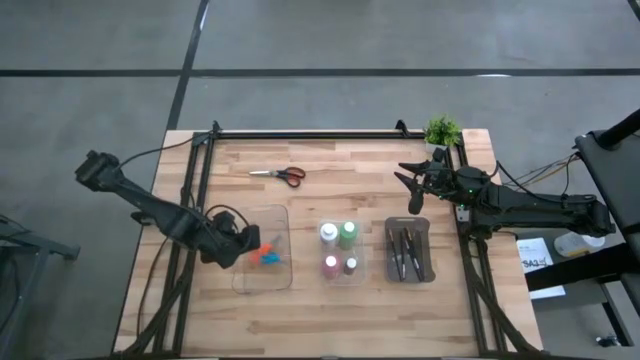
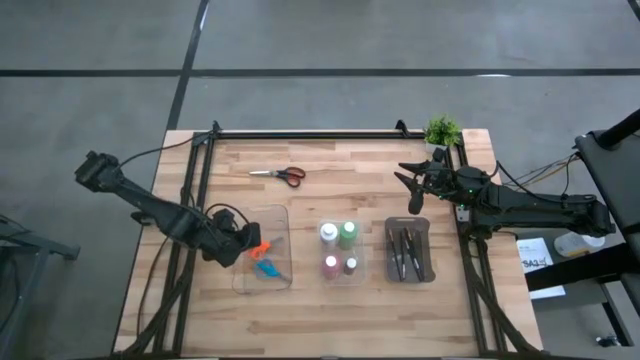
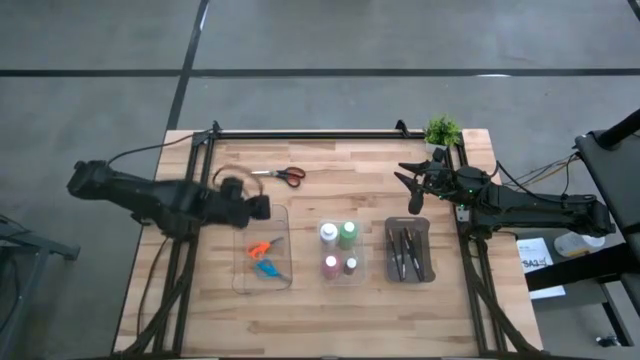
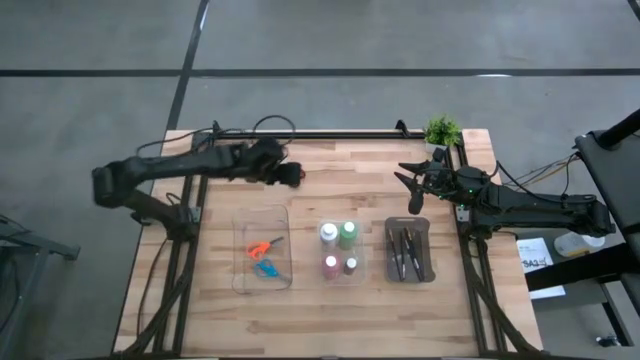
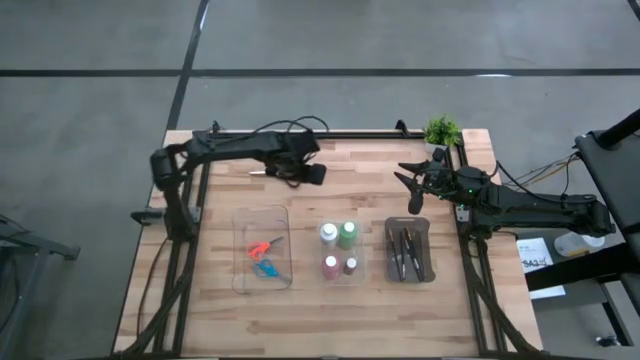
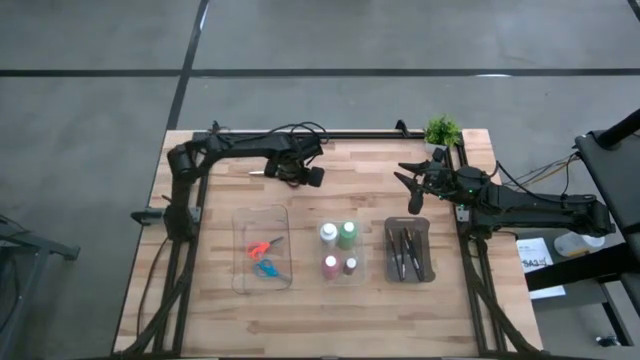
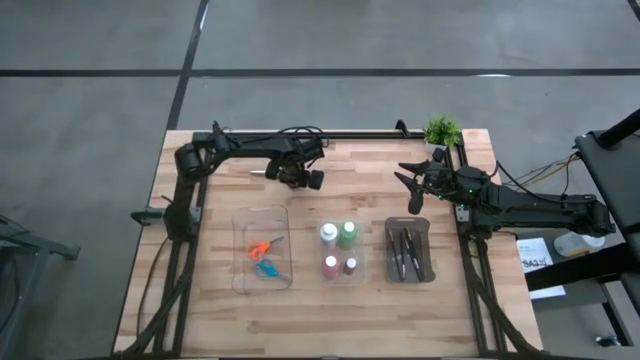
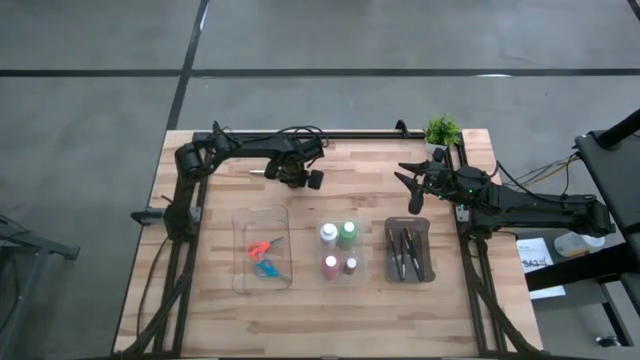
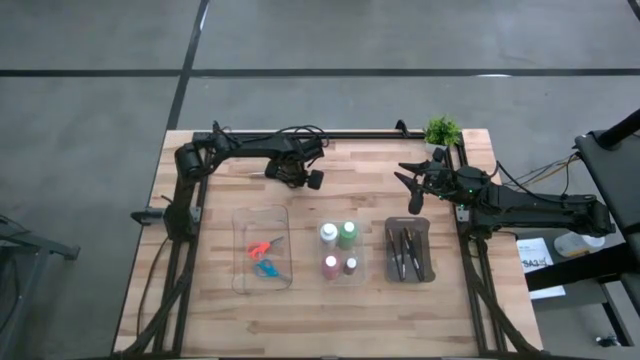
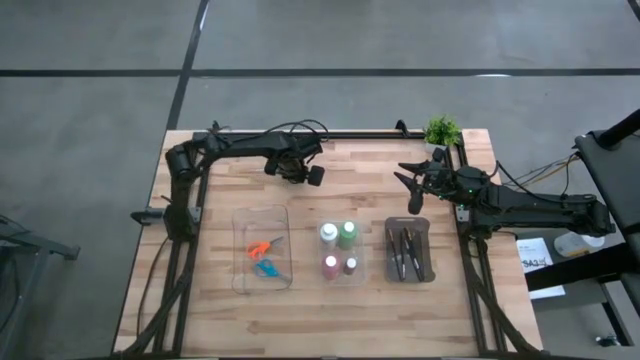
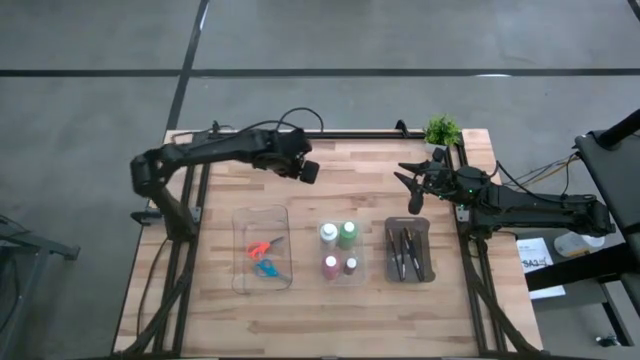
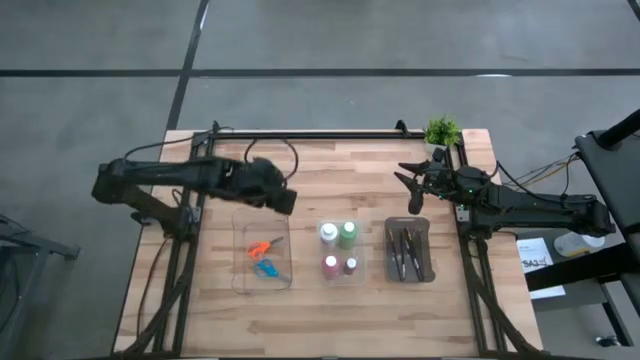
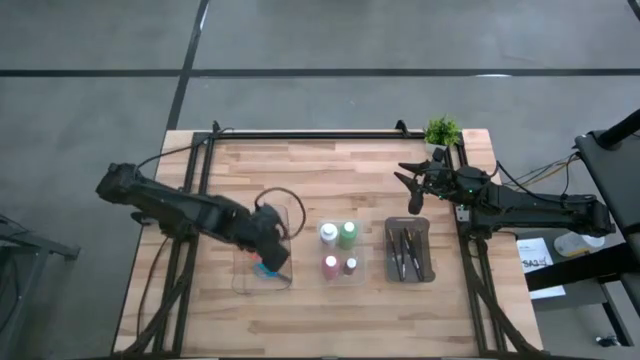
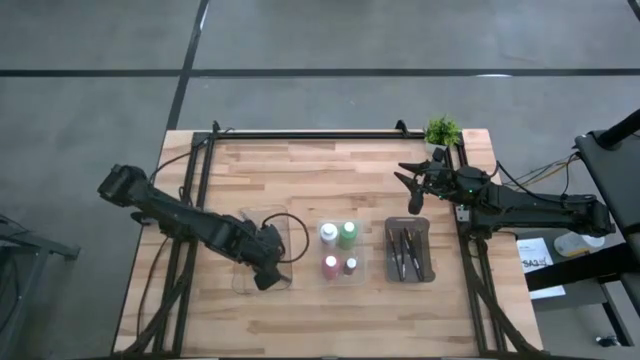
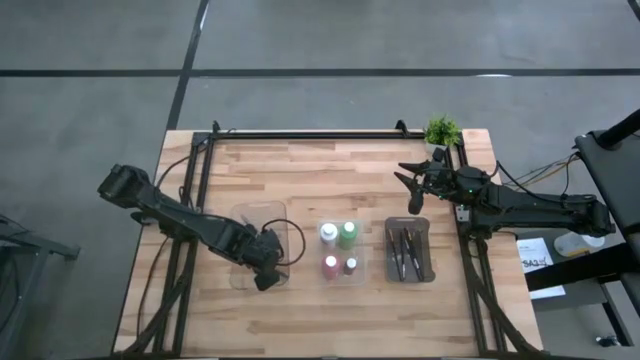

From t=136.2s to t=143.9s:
Task: Pick & Place Paint Supplies
Put the black scissors into the transparent bin

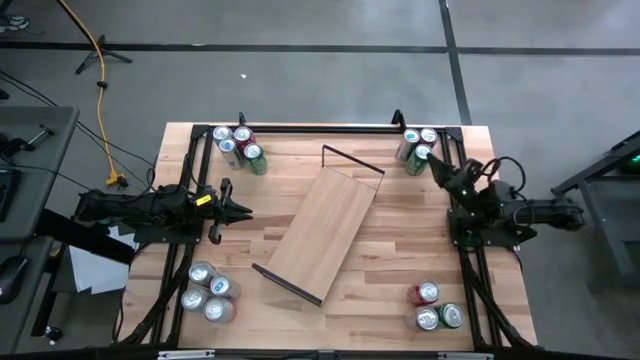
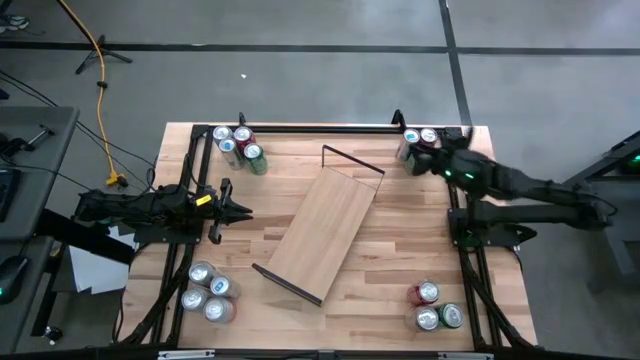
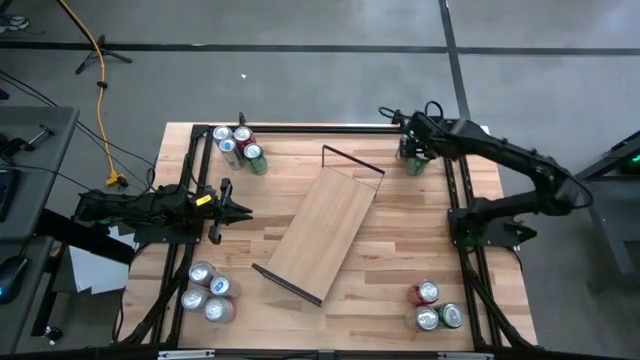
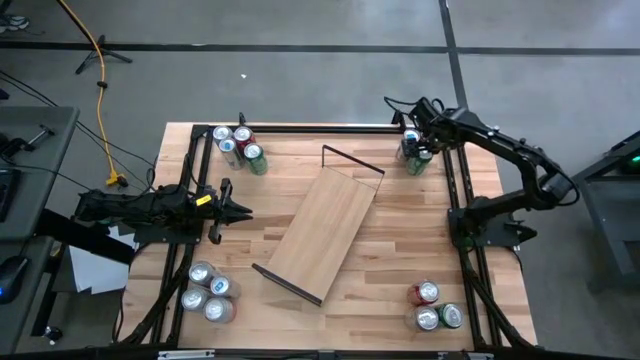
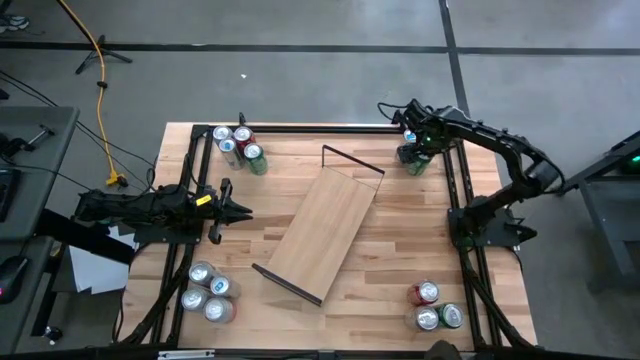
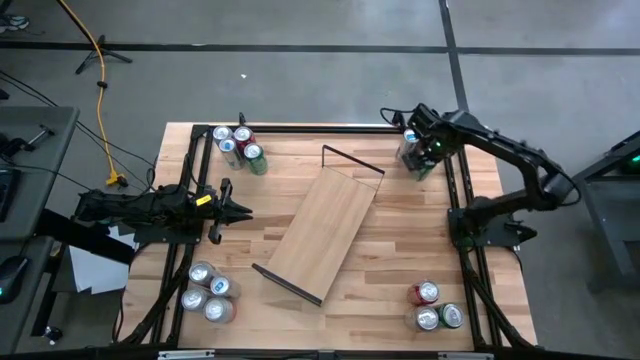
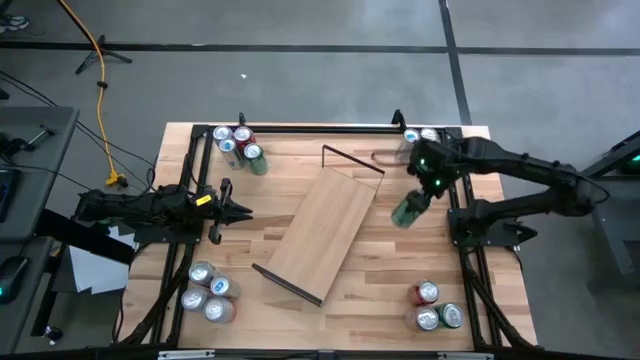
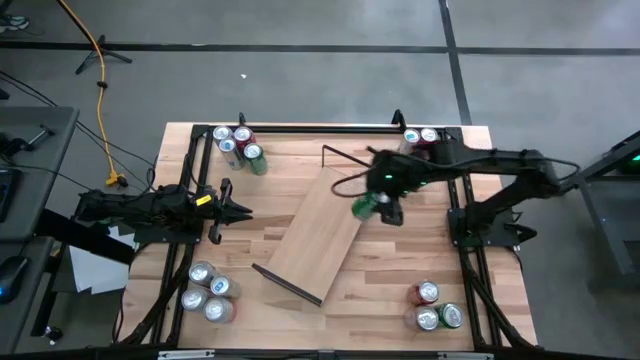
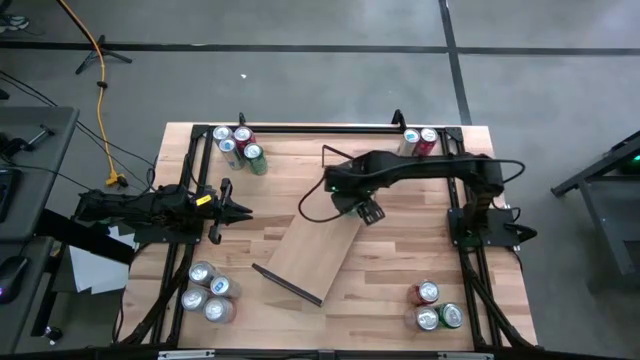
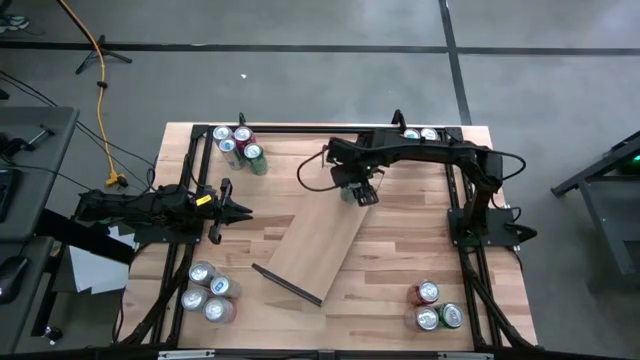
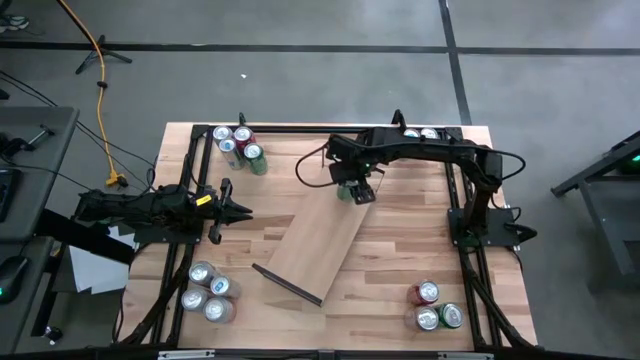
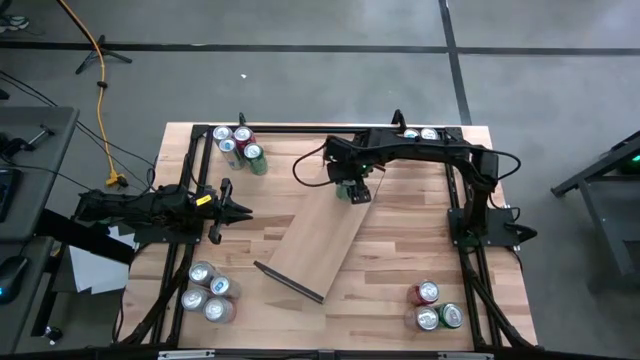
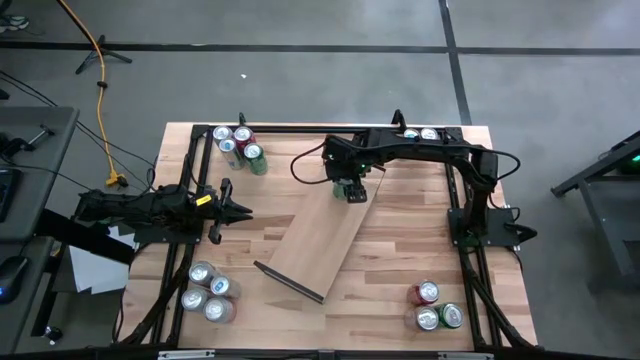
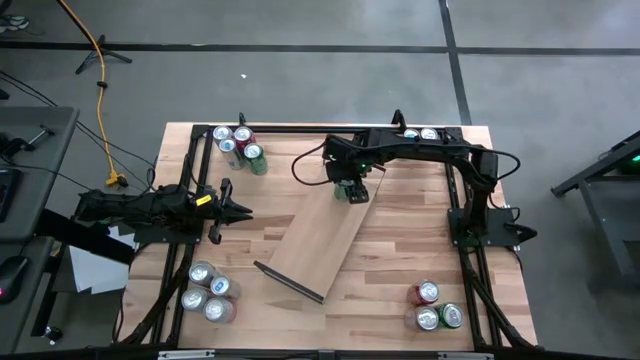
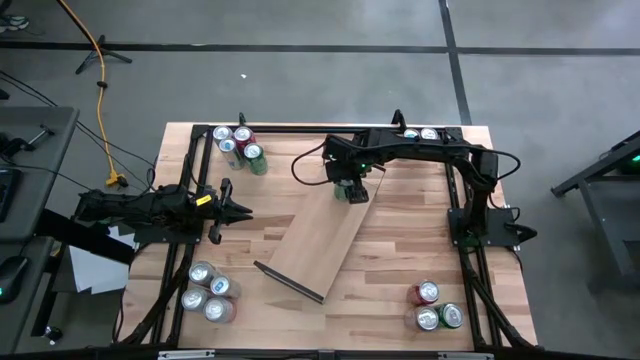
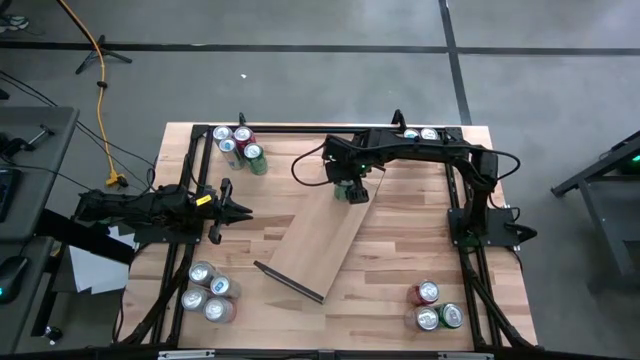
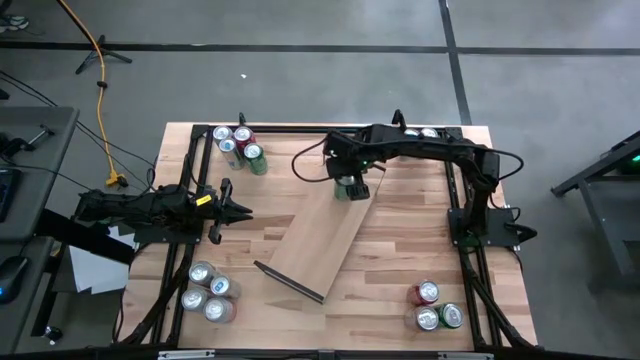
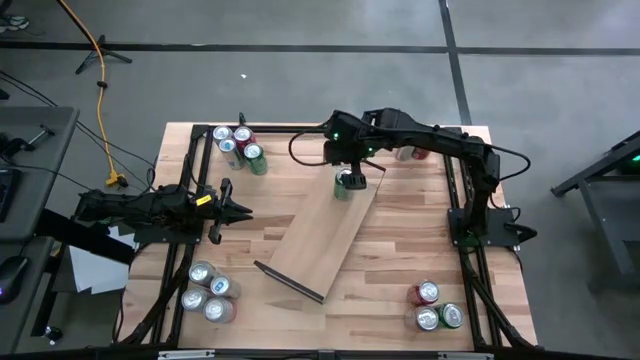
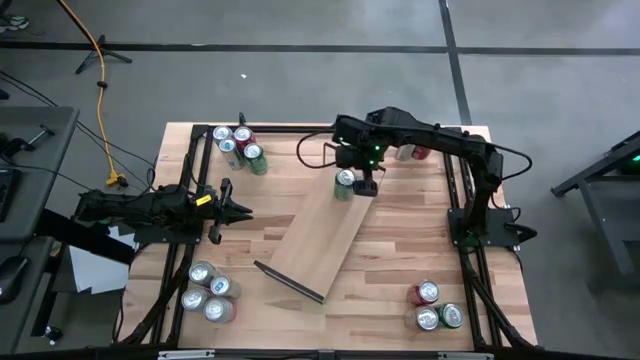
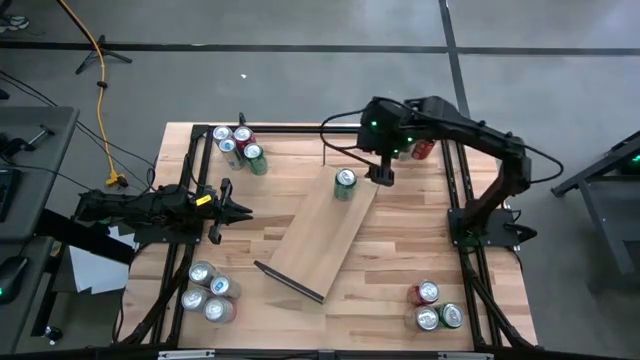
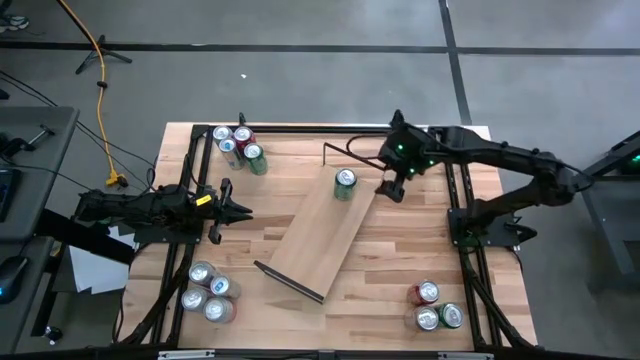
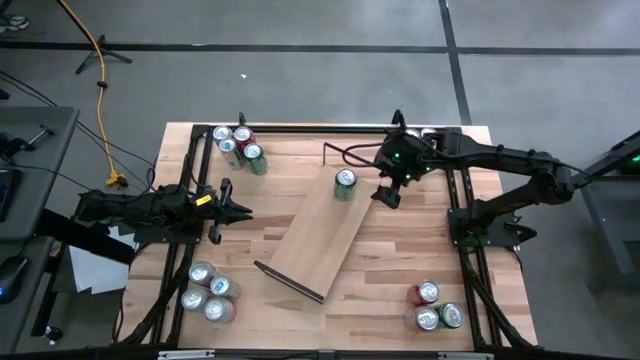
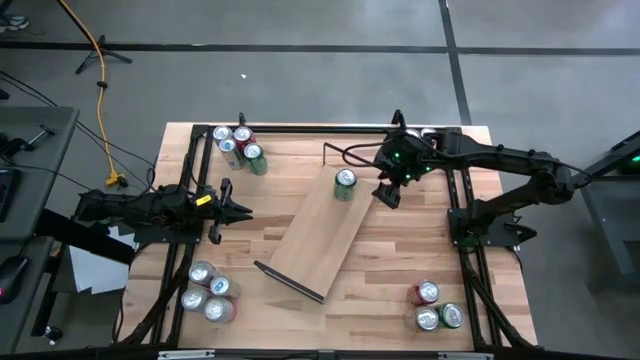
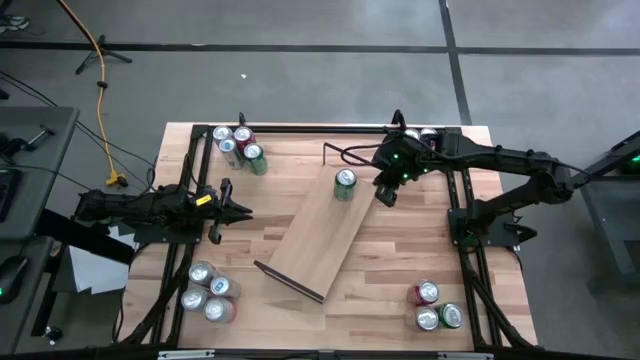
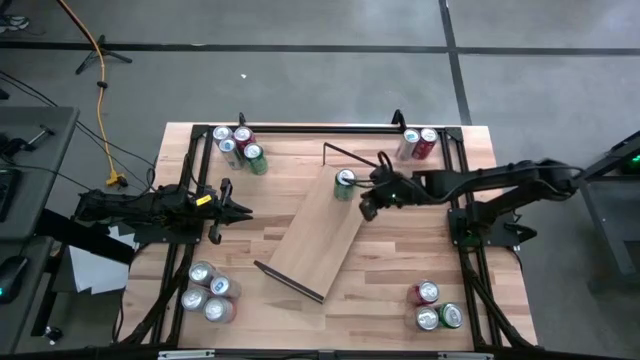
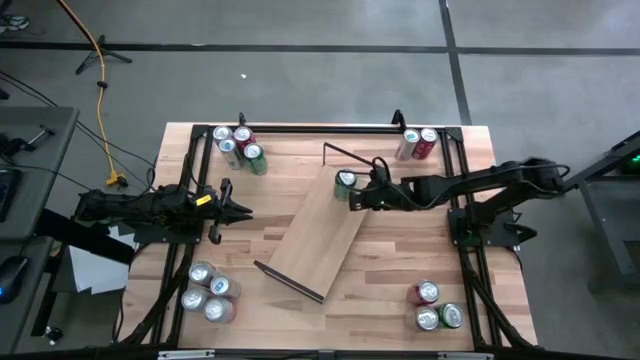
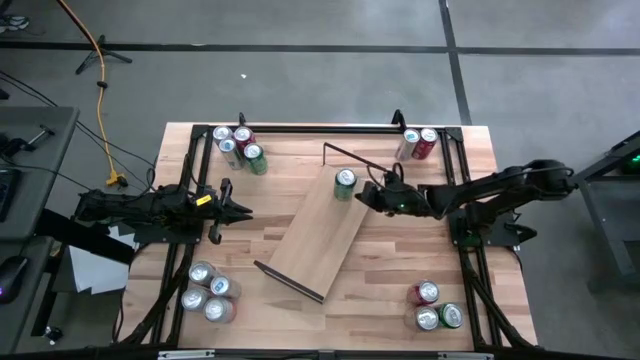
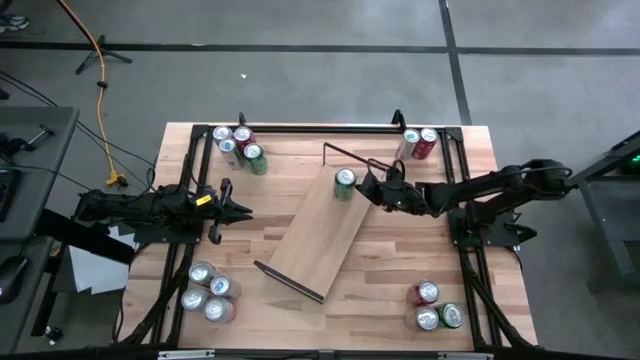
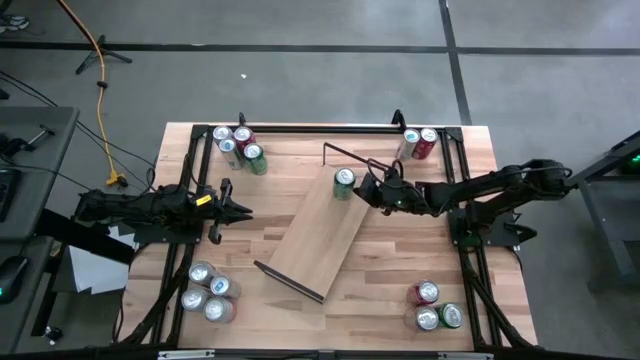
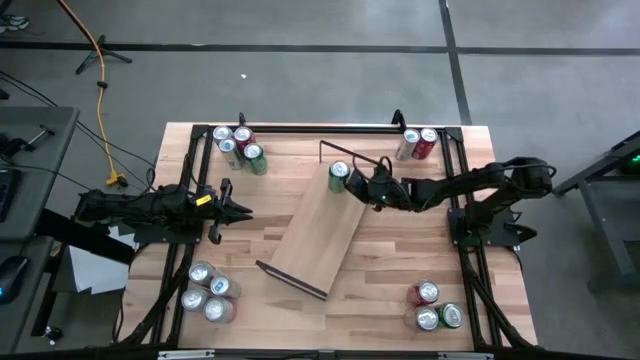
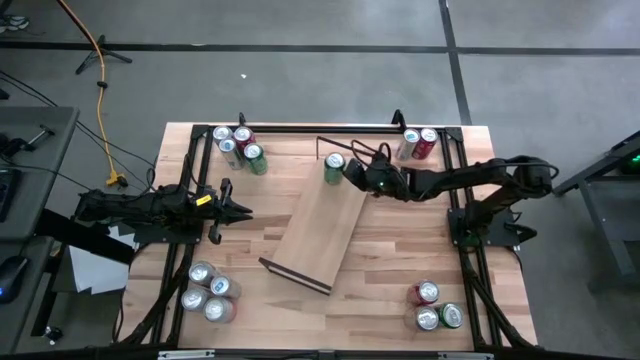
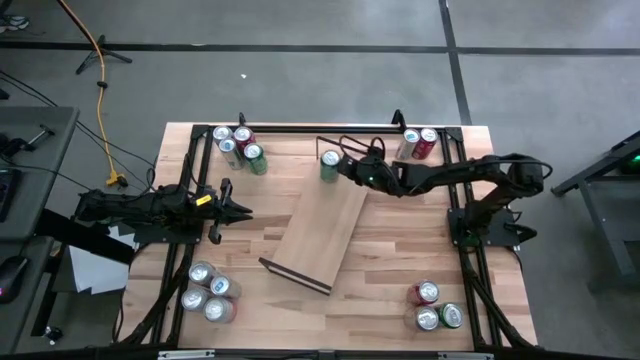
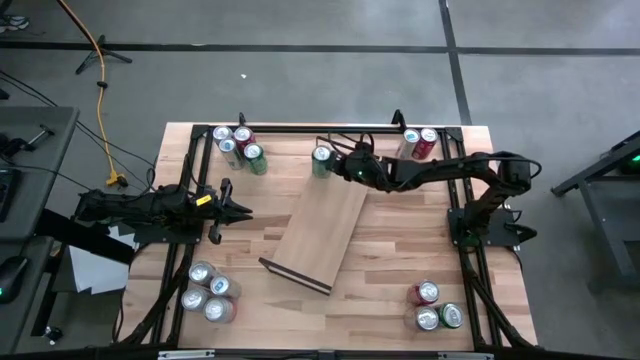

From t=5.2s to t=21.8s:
Task: Place canned beverage on shelf
Put the top right green soda can on the shelf
